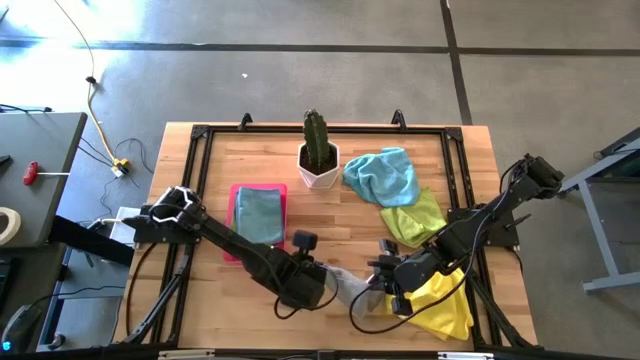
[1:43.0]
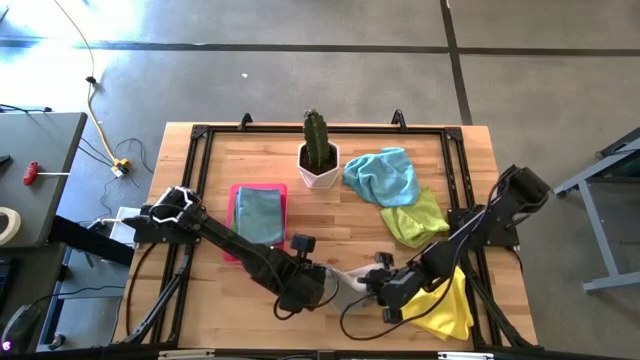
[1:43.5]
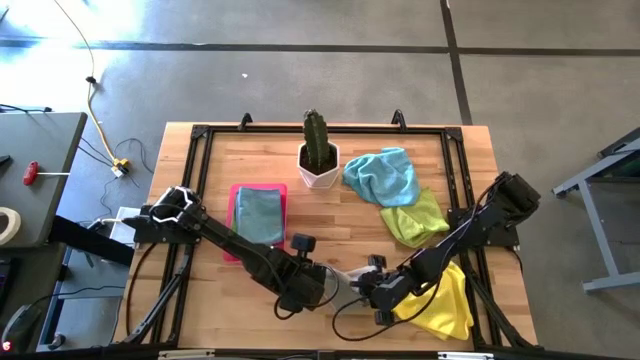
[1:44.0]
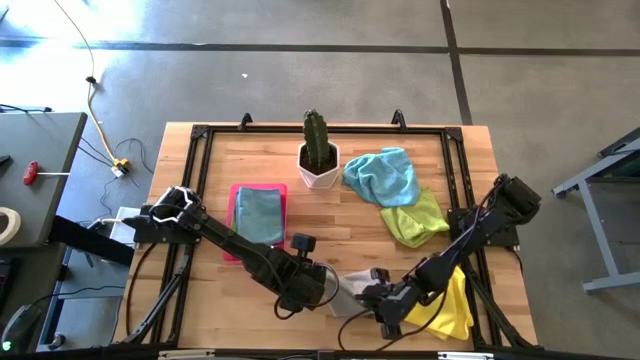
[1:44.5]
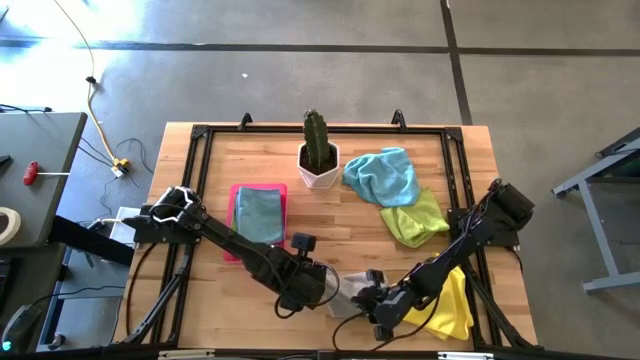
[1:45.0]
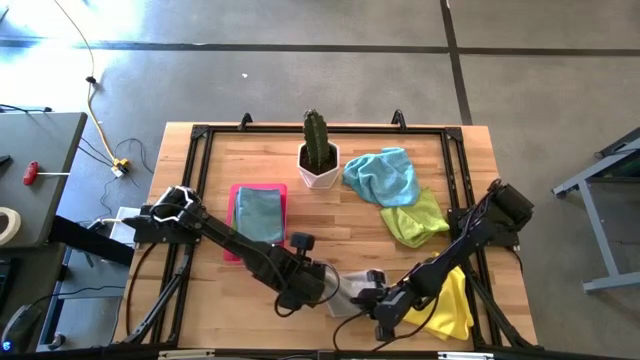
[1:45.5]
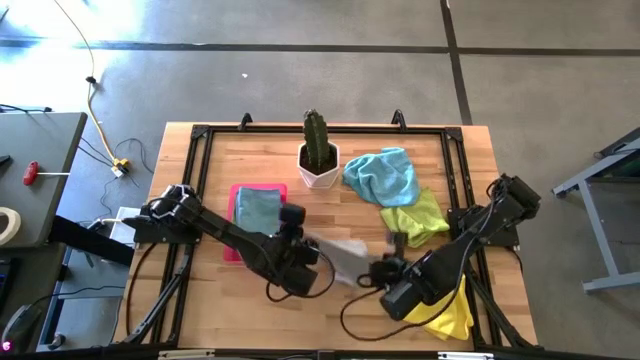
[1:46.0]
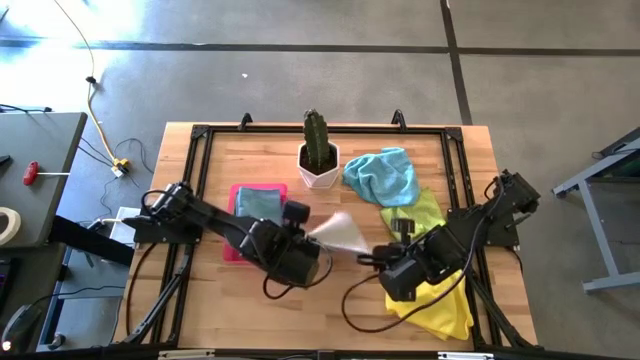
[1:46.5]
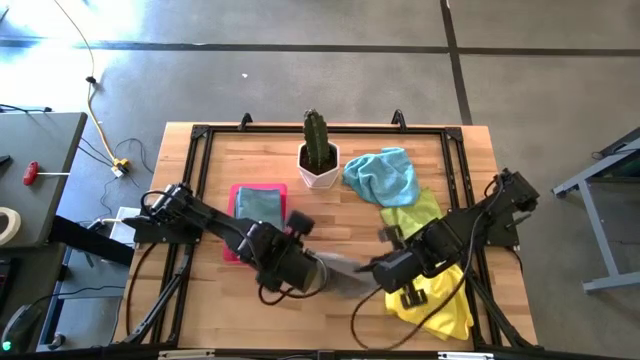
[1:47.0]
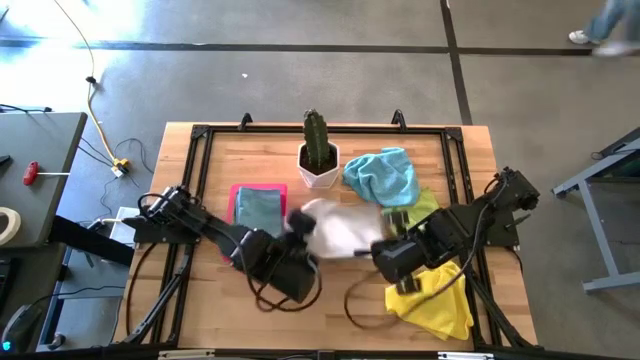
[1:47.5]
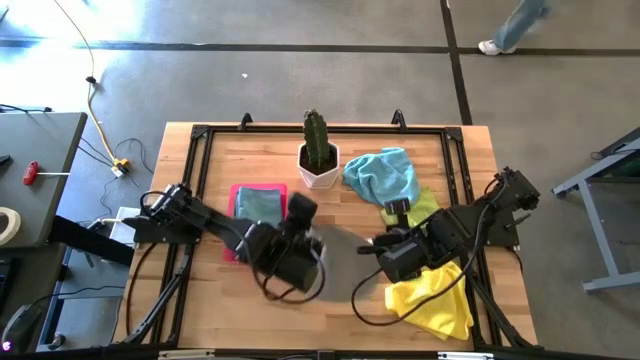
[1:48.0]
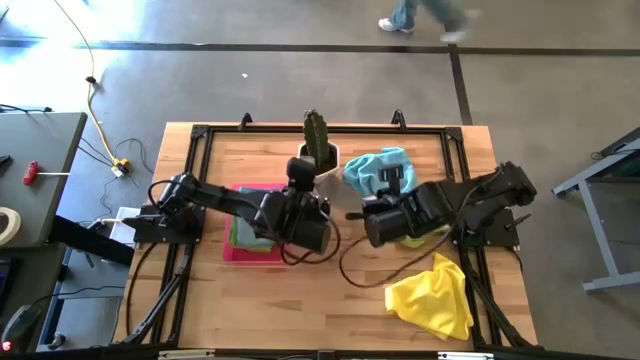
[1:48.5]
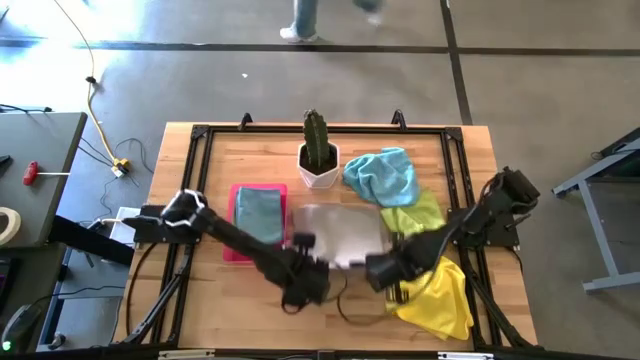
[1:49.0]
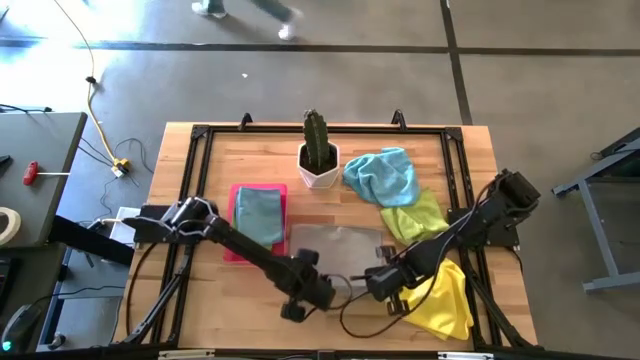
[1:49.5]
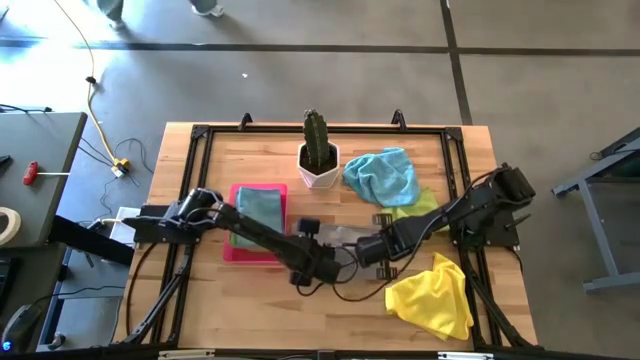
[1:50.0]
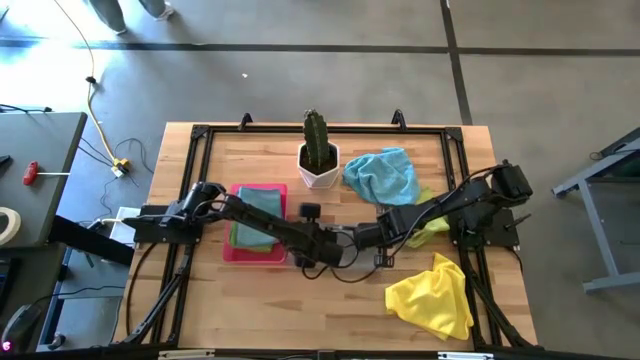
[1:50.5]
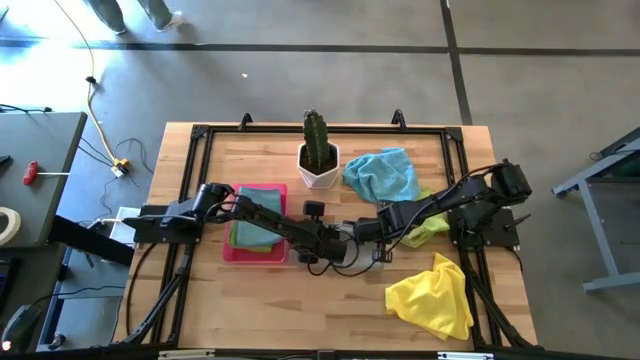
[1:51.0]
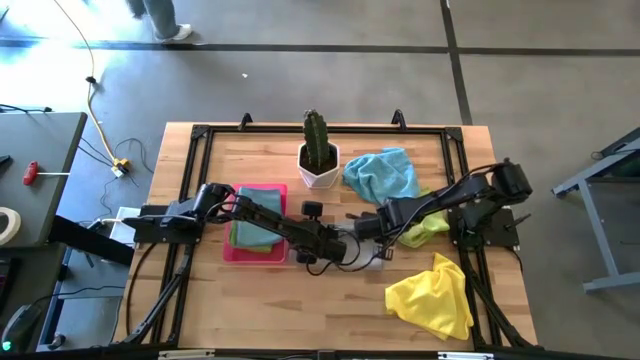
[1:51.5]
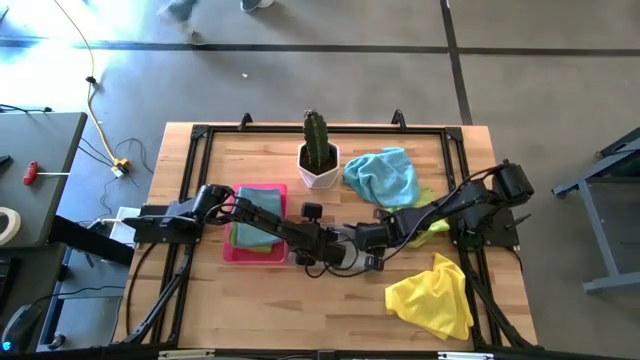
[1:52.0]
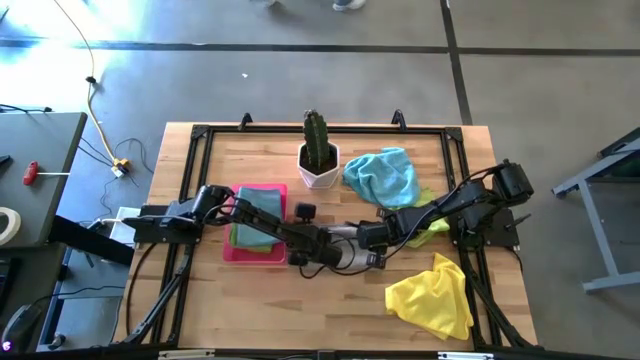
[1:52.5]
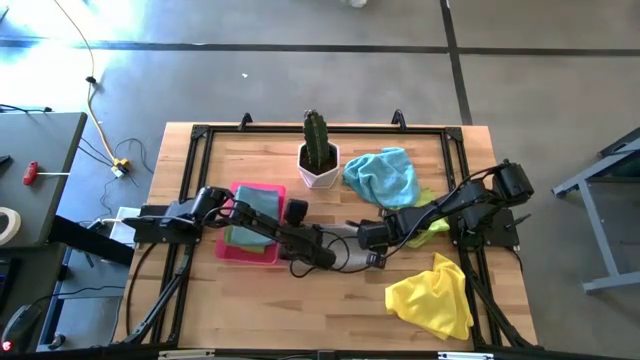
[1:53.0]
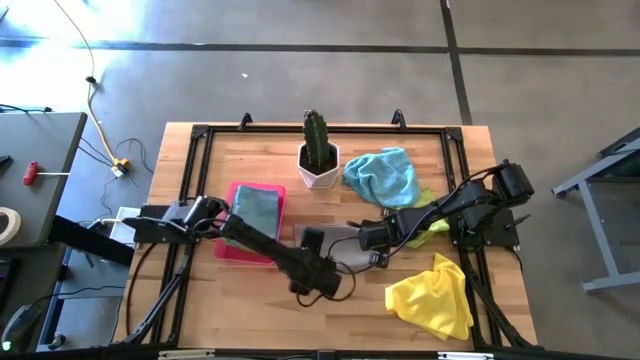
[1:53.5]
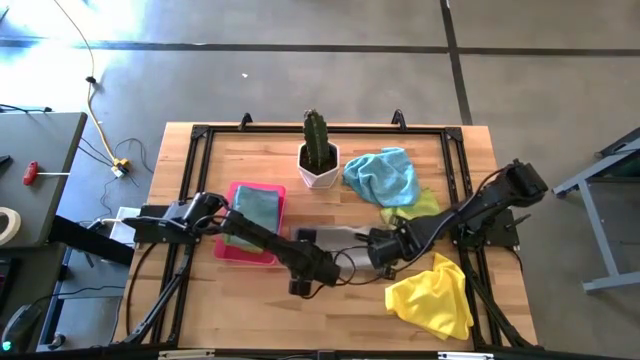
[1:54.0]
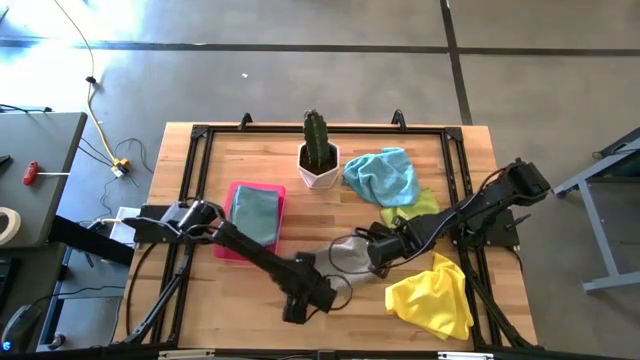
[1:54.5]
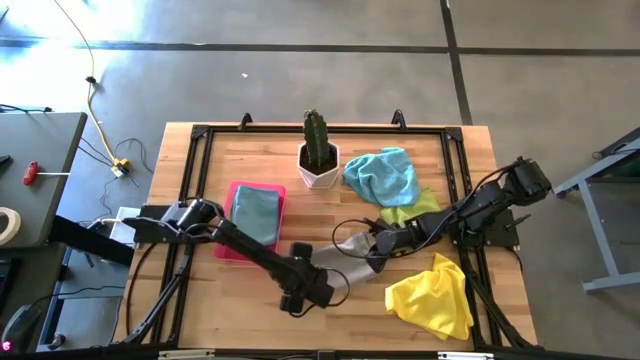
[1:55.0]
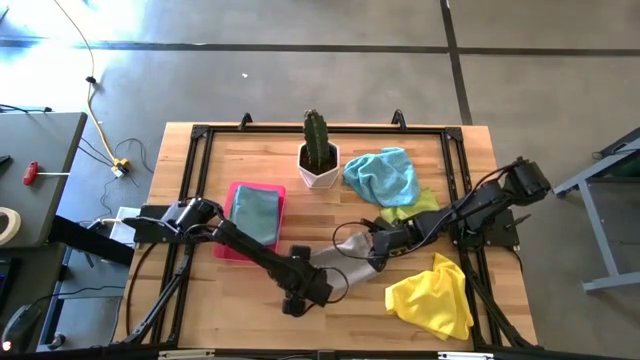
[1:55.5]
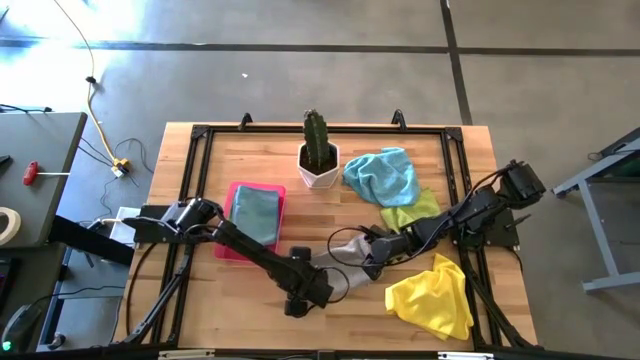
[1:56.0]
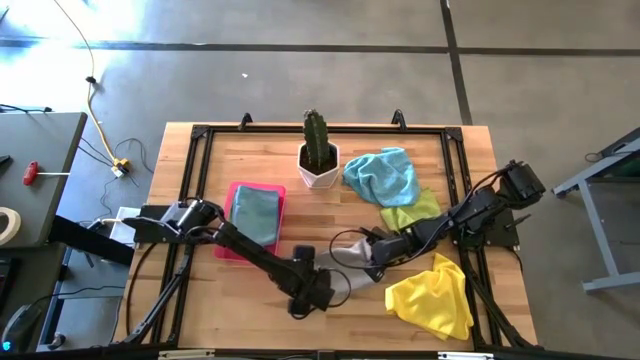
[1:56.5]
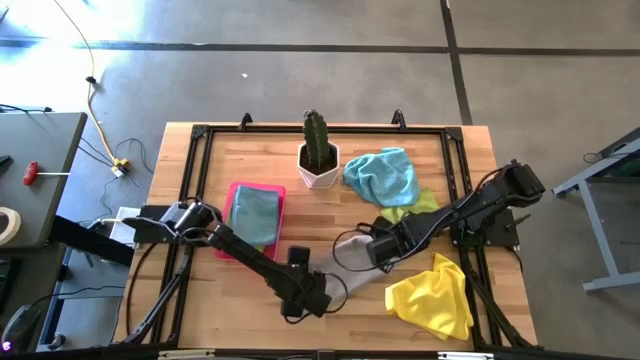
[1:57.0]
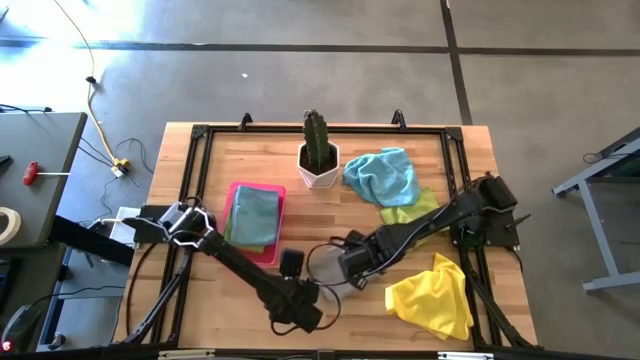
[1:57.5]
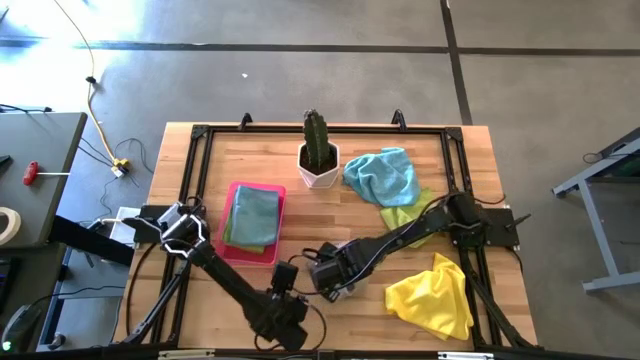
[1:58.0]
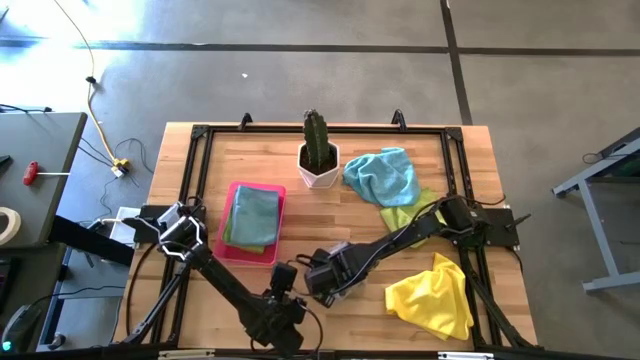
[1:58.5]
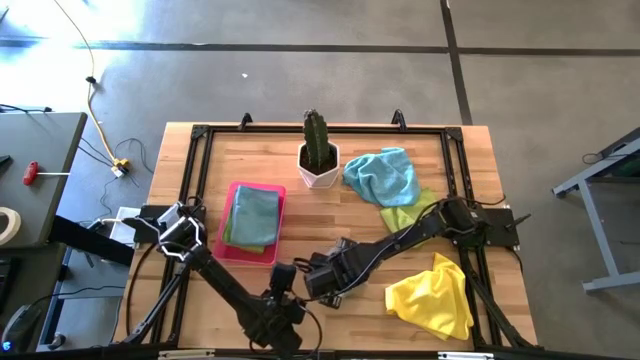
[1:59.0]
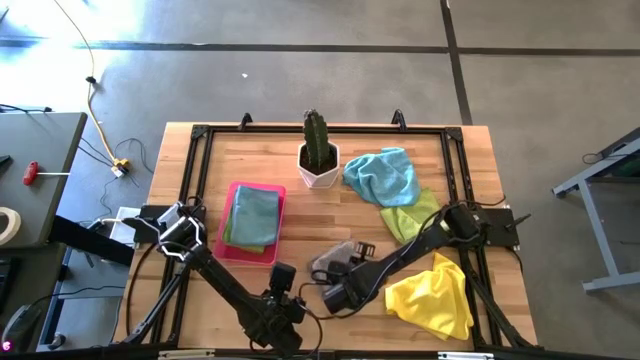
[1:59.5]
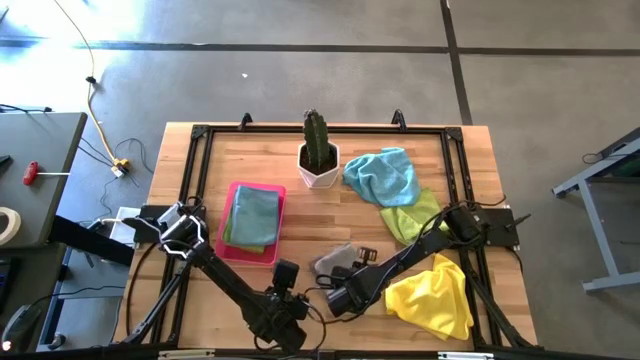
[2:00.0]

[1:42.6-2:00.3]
Task: Fold microfiber towels
Fold the gray towel

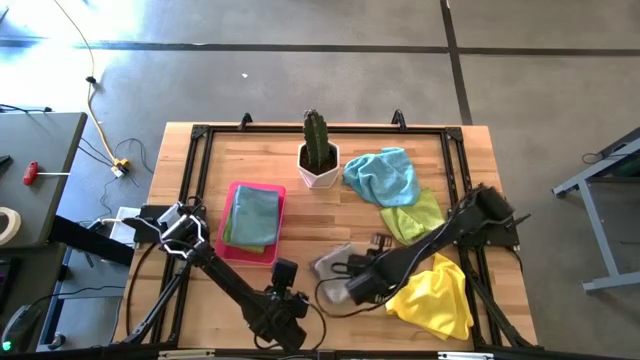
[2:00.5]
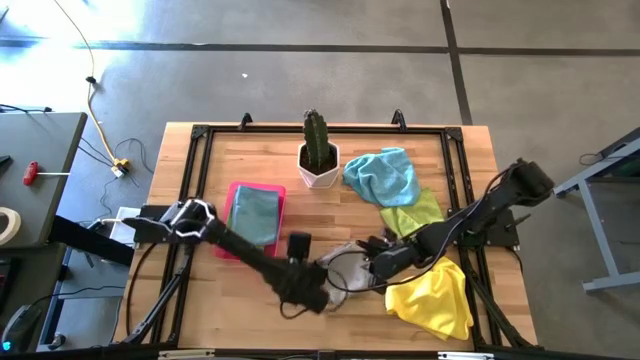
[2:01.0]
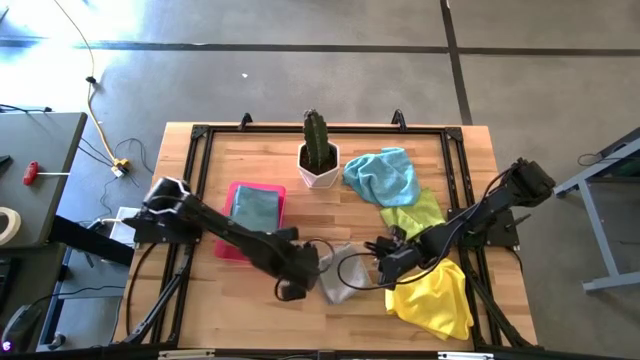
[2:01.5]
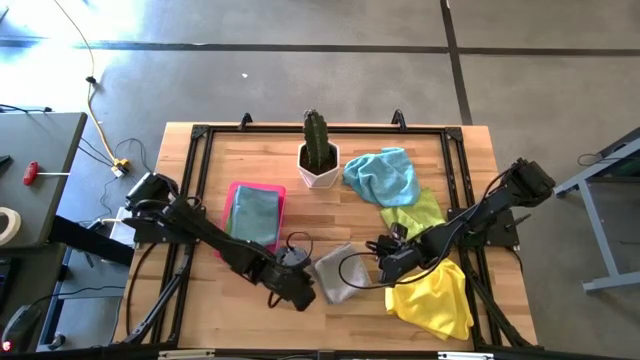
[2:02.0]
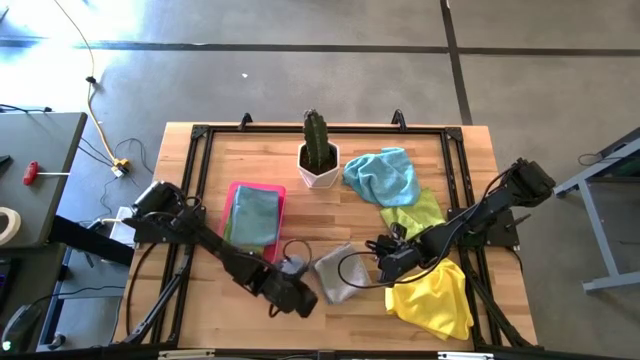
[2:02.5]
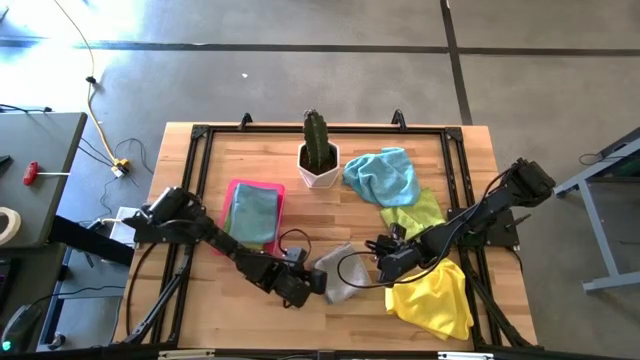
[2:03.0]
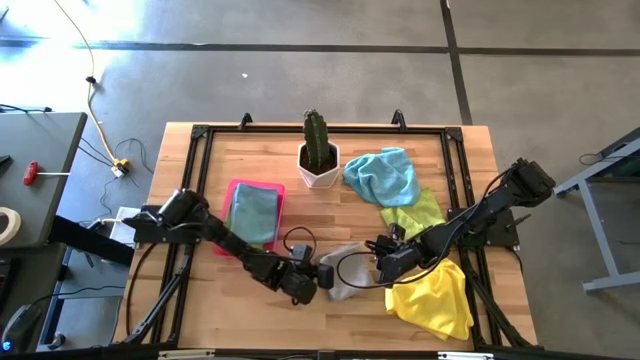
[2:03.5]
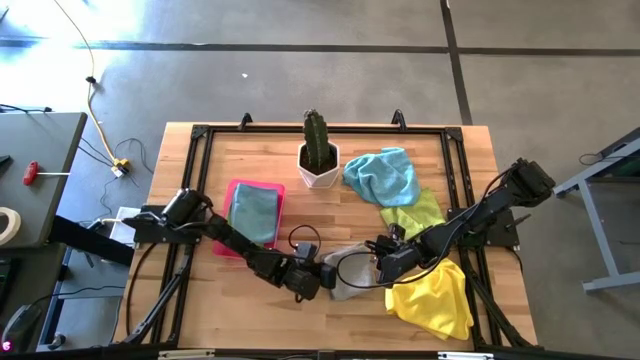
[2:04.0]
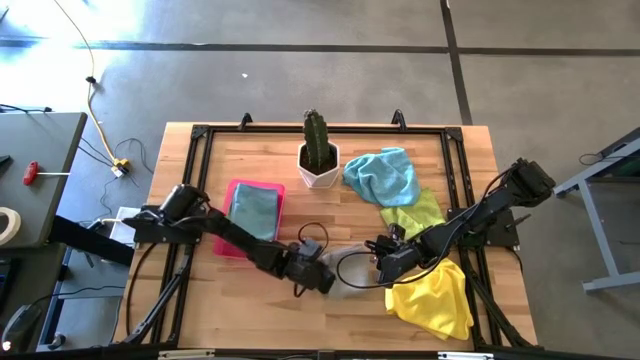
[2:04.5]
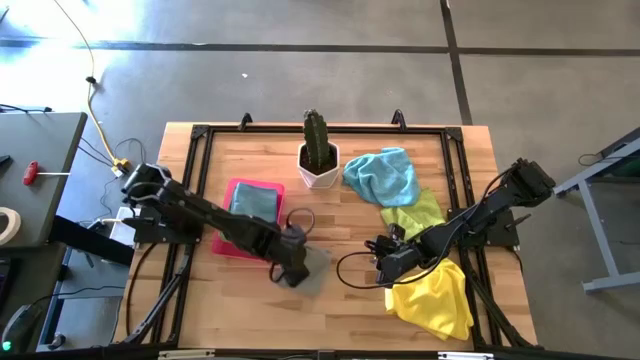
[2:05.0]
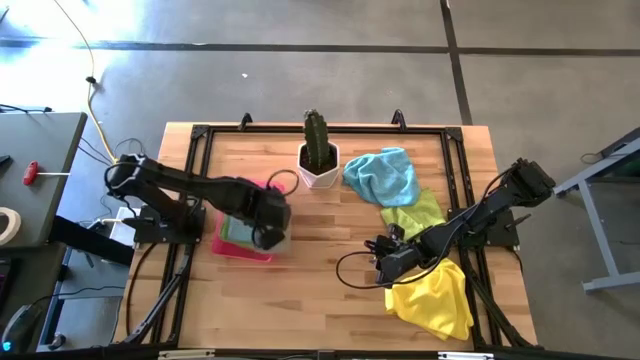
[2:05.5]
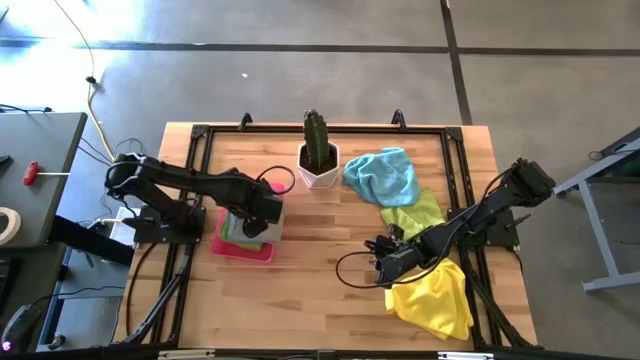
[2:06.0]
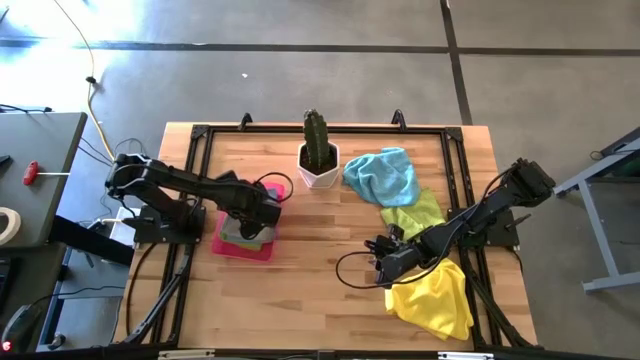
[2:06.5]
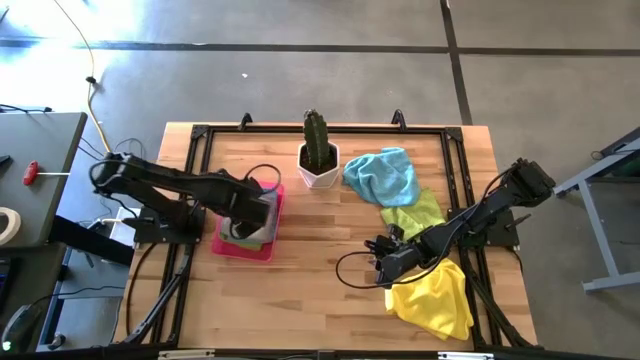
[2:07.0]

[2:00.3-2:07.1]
Put the gray towel in the pink bin
